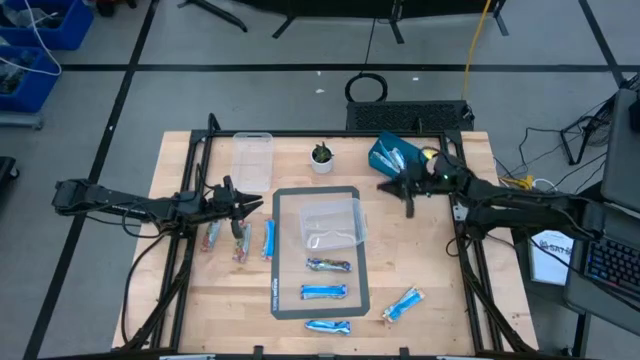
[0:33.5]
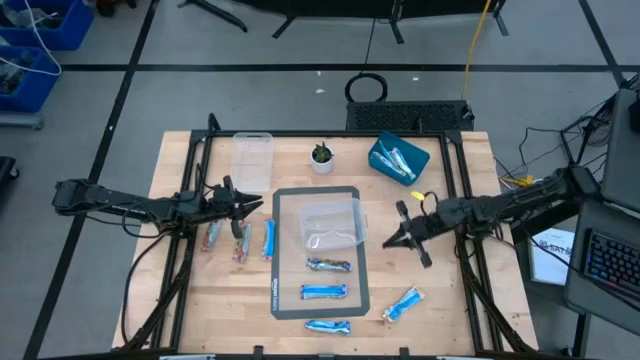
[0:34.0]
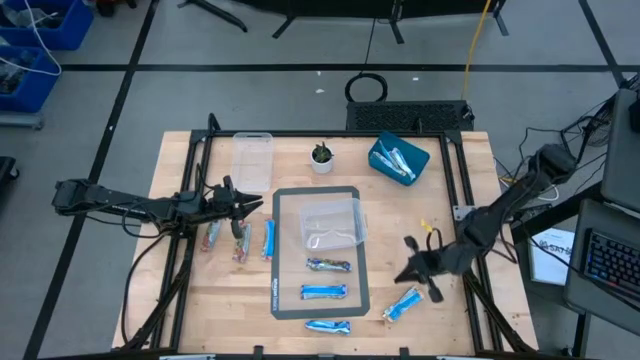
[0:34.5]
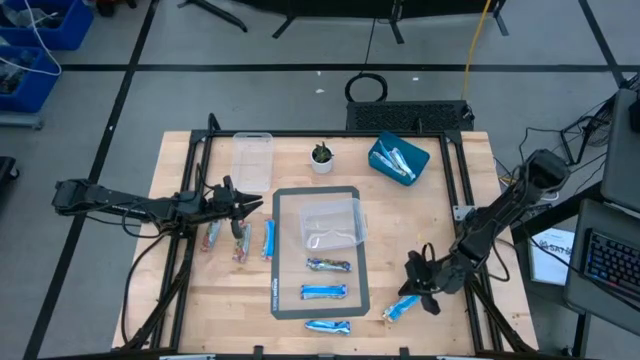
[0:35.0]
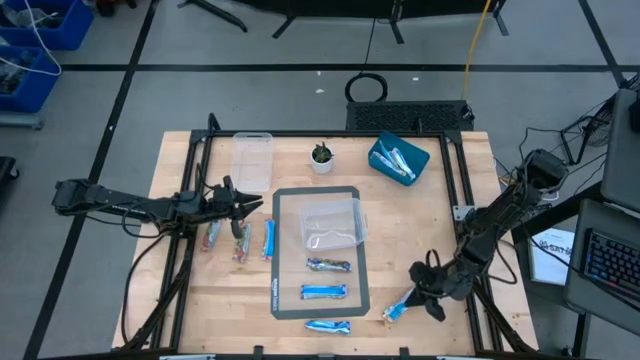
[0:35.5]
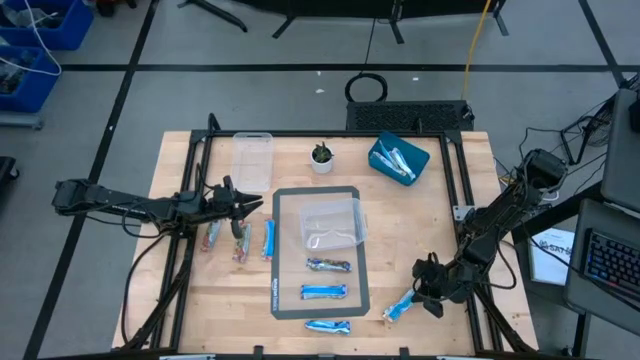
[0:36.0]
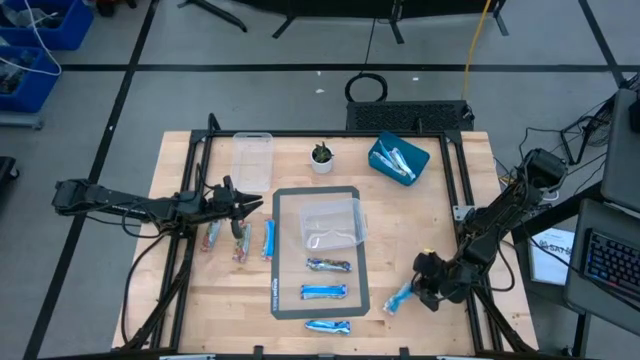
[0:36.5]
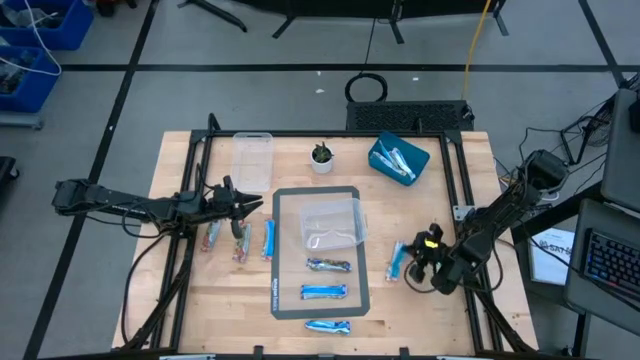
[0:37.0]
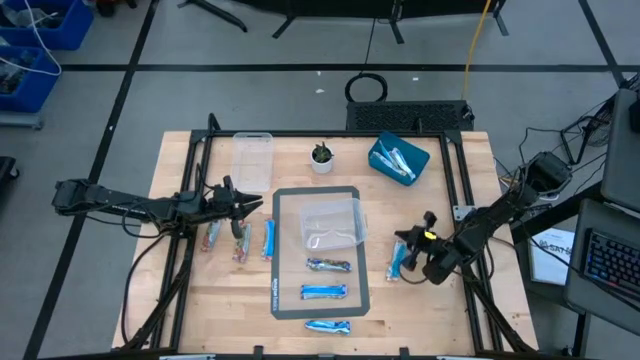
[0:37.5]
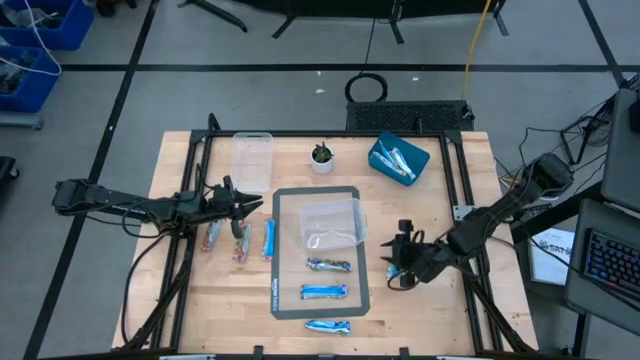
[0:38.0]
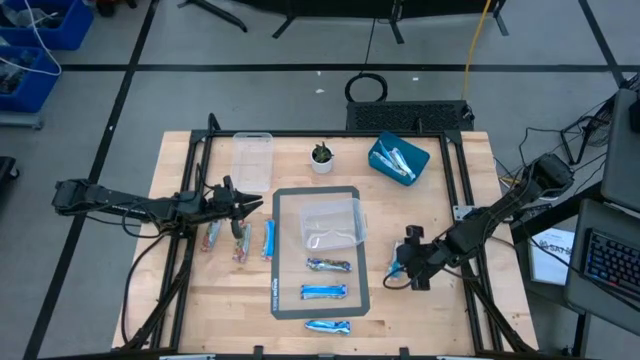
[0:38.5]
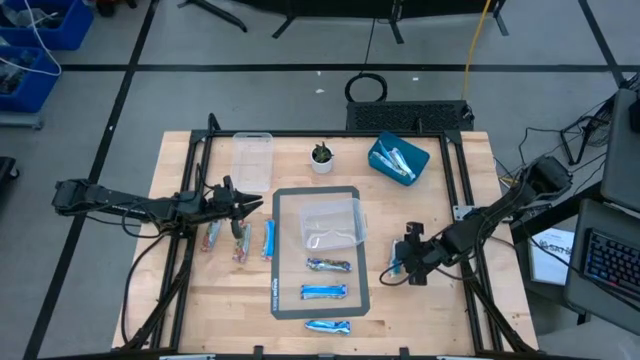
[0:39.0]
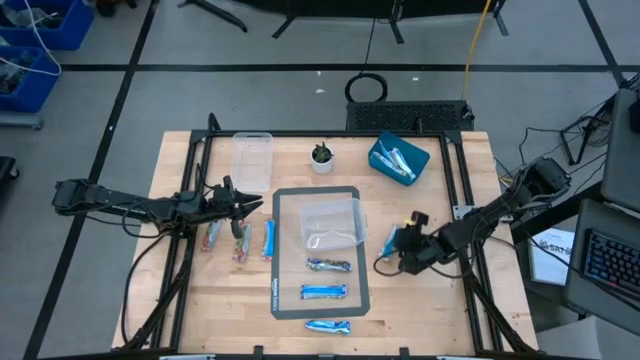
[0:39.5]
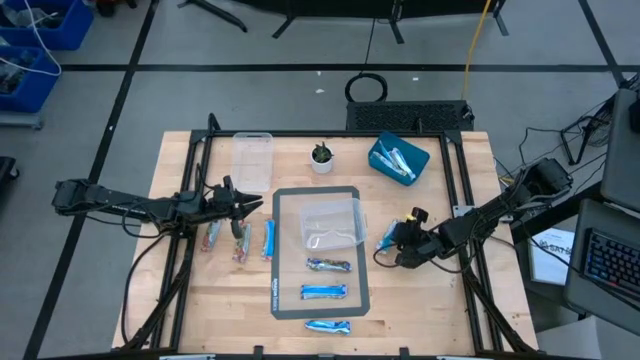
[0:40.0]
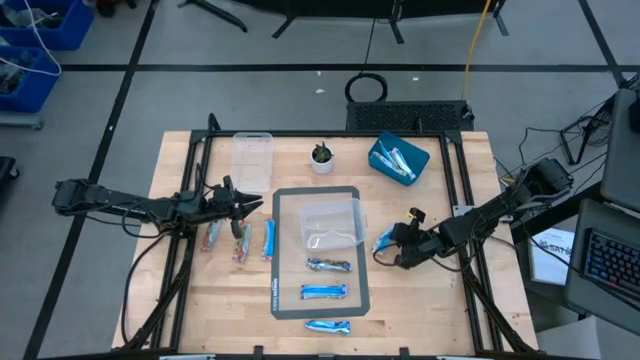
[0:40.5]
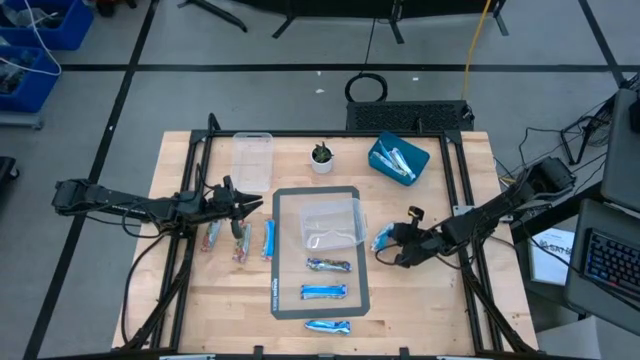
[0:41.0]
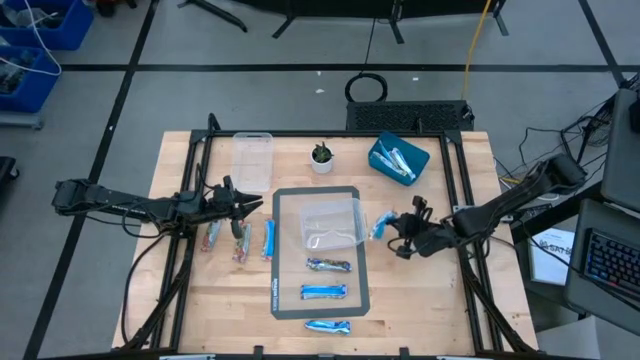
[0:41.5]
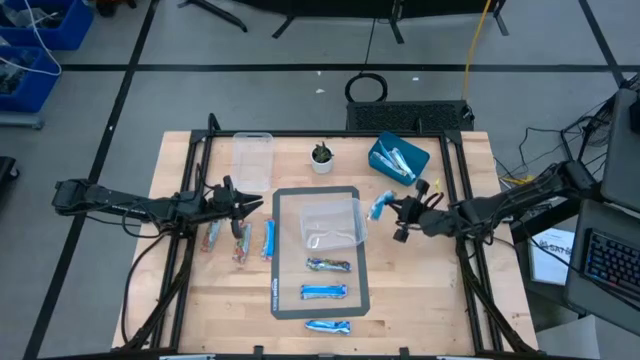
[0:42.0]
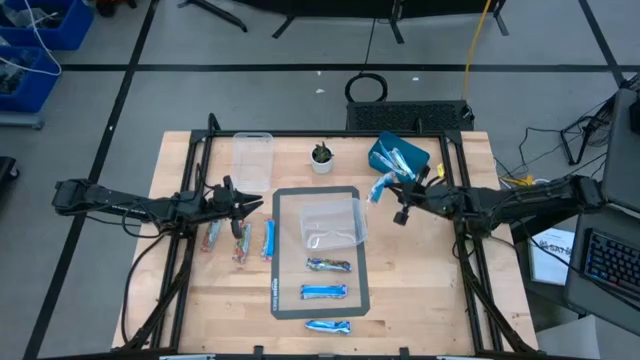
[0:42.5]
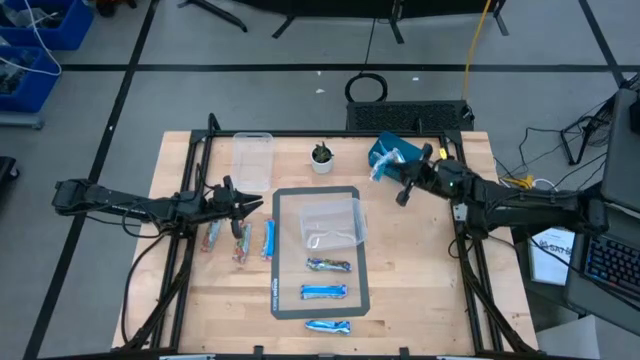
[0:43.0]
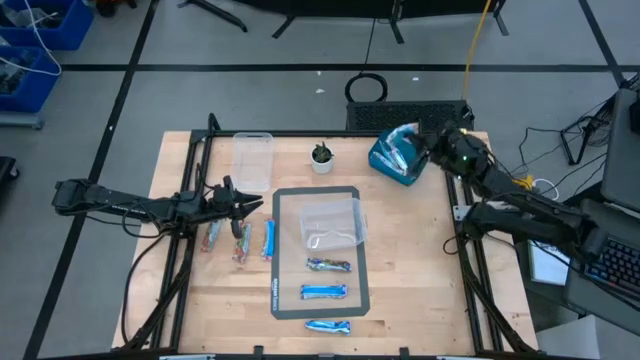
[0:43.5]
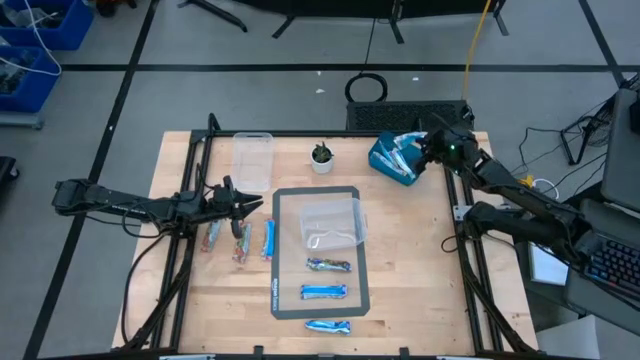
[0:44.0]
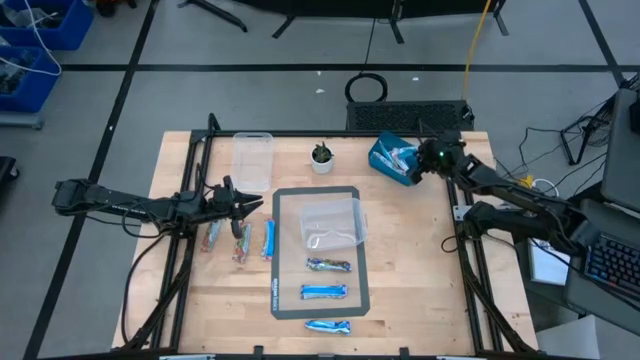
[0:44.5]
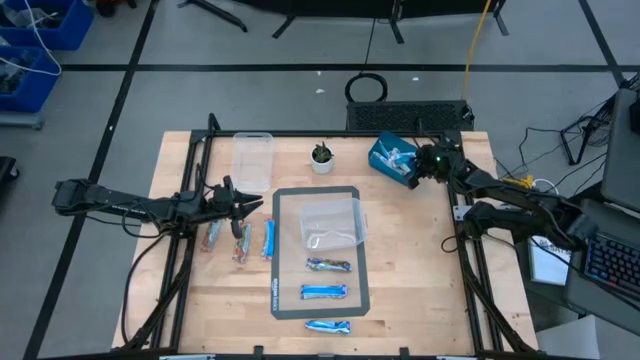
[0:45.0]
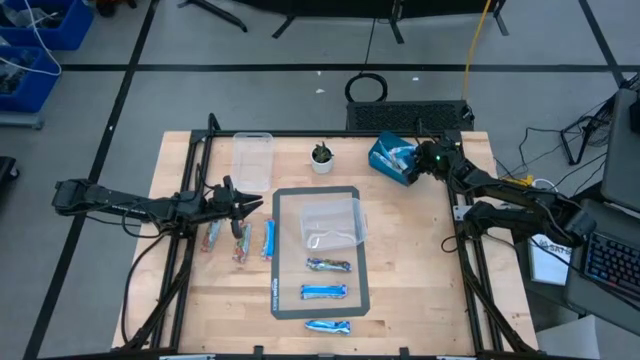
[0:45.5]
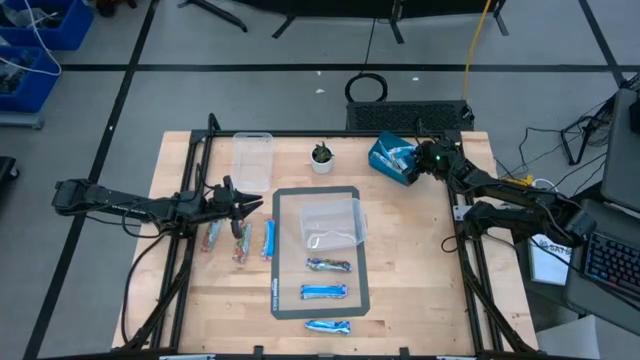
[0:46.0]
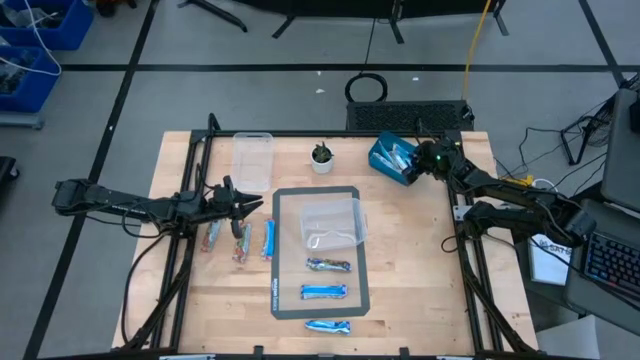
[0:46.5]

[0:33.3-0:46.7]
Task: Pick and place Granola Bars by type
Put the snack into the right bin

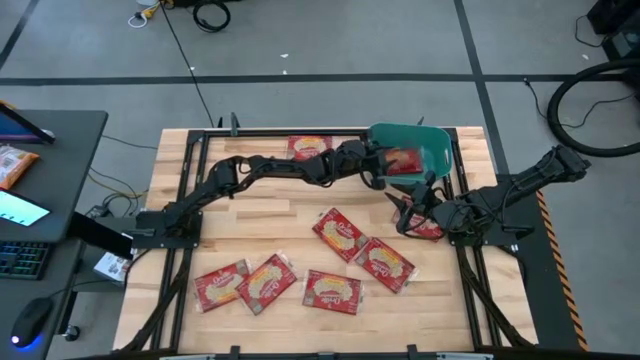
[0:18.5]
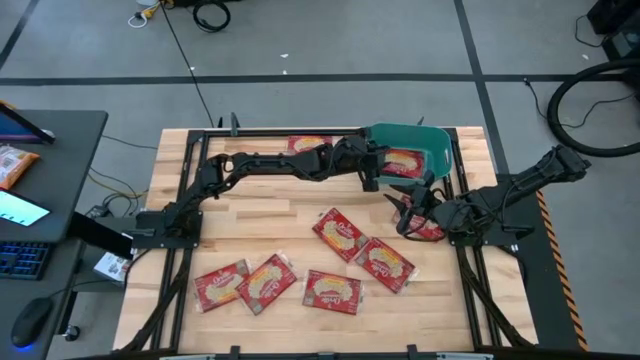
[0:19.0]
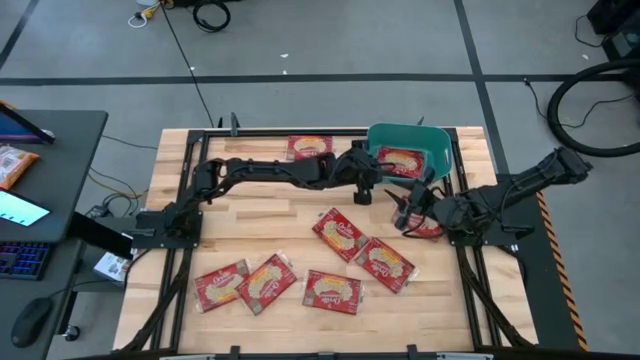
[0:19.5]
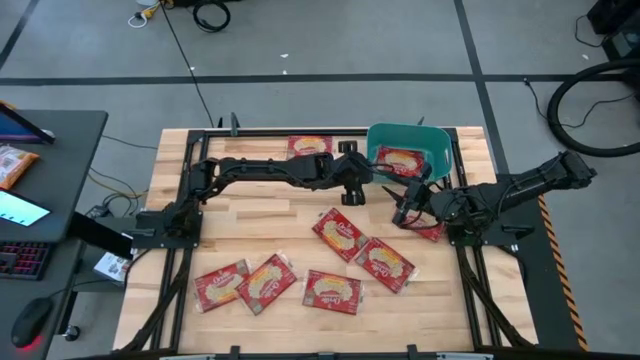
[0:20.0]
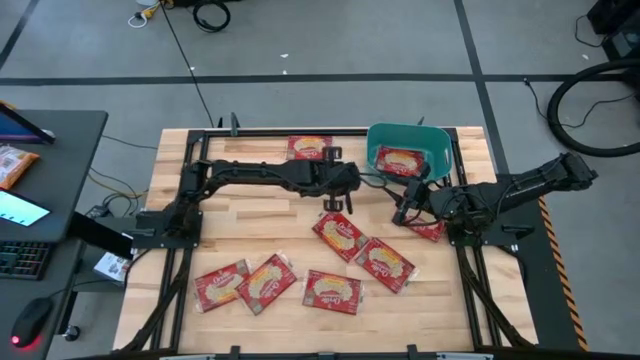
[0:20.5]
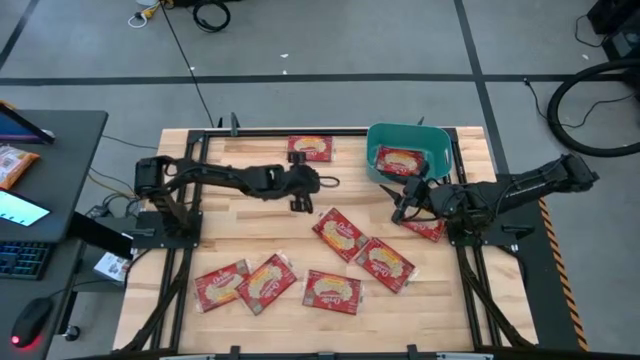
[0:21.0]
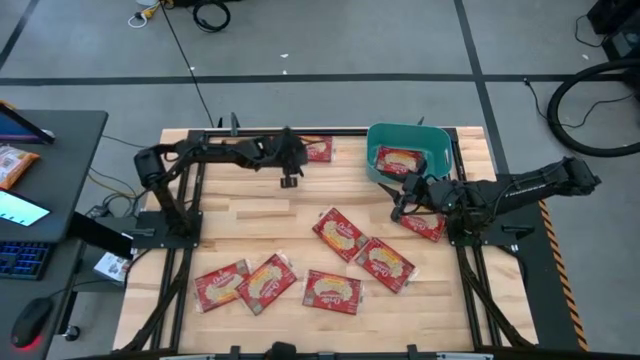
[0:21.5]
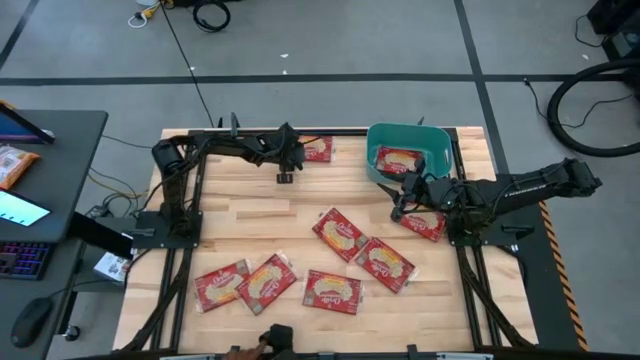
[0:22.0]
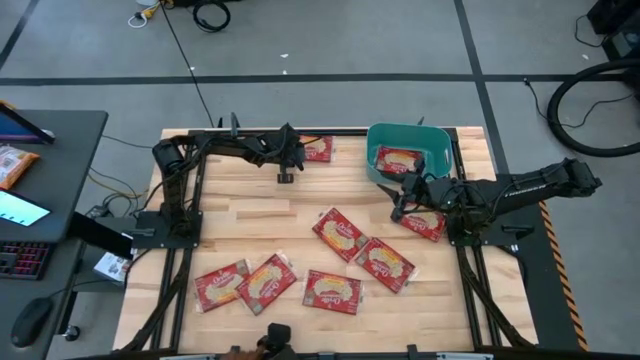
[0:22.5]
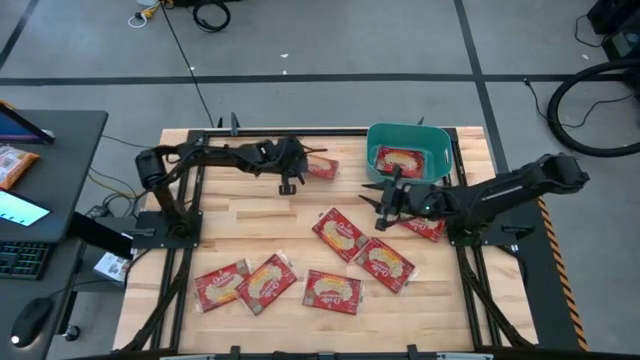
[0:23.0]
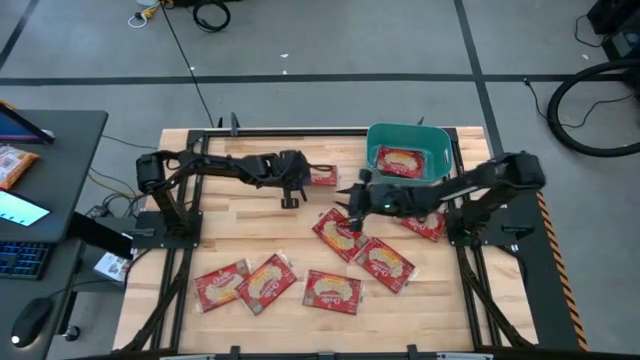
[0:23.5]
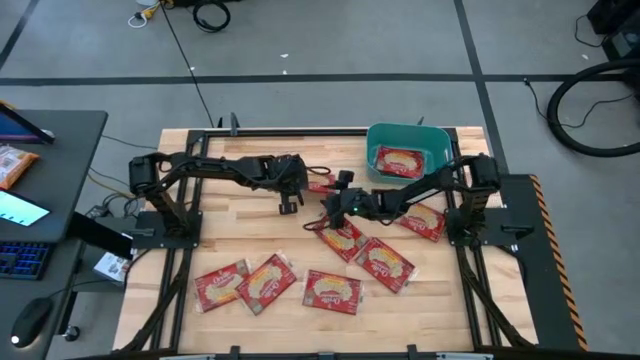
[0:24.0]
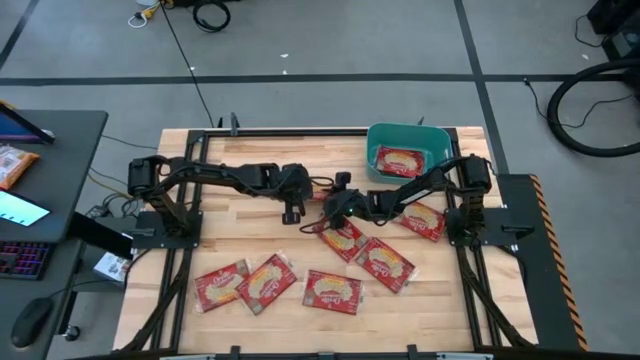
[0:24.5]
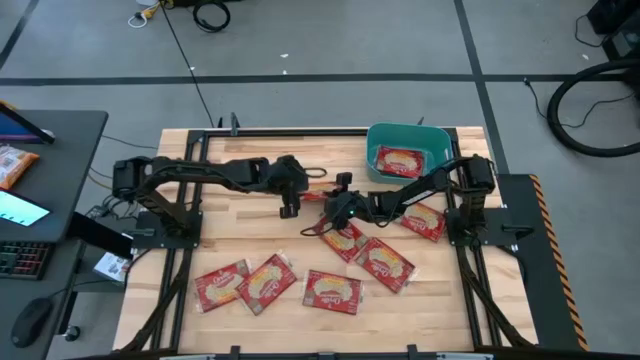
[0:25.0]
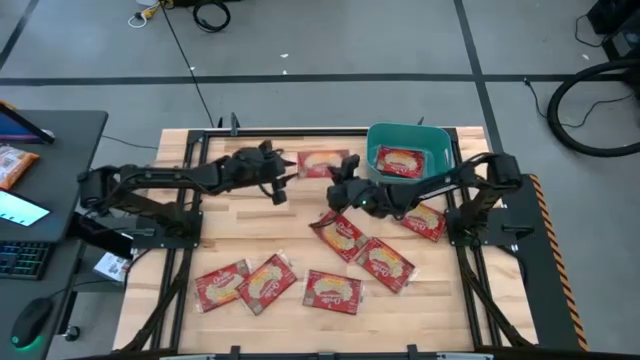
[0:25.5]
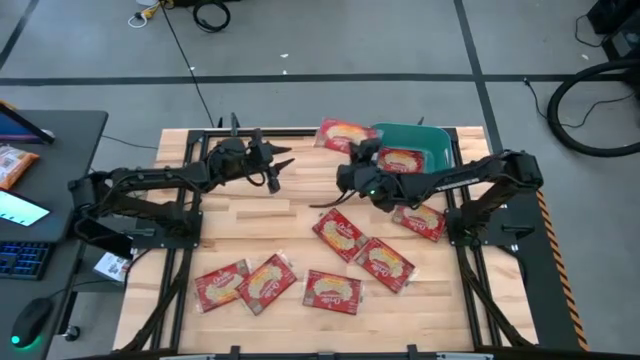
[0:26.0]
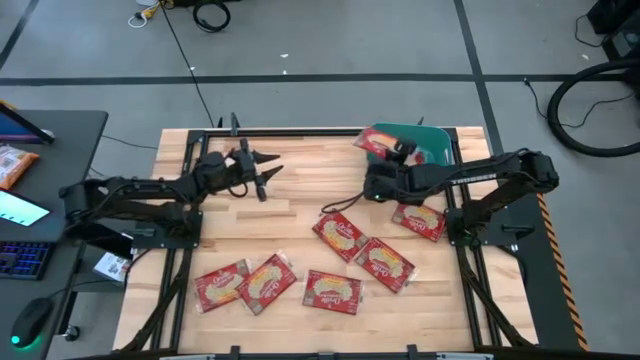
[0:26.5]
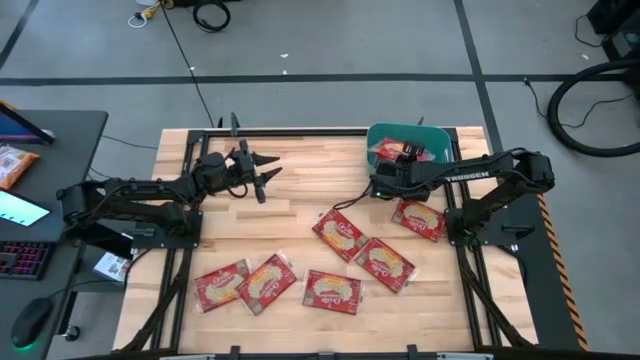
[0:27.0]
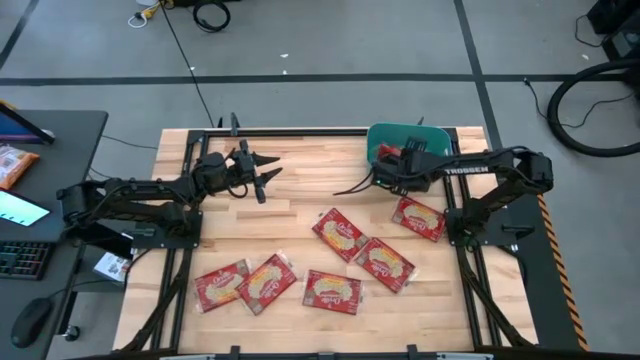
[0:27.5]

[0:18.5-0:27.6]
Task: Sort popcorn bags into baskets
Put the red popcorn bag into the blue bin
